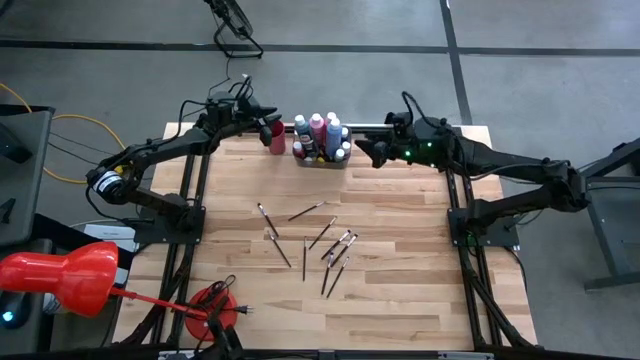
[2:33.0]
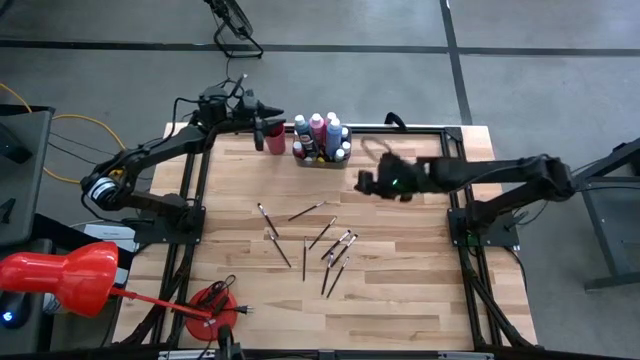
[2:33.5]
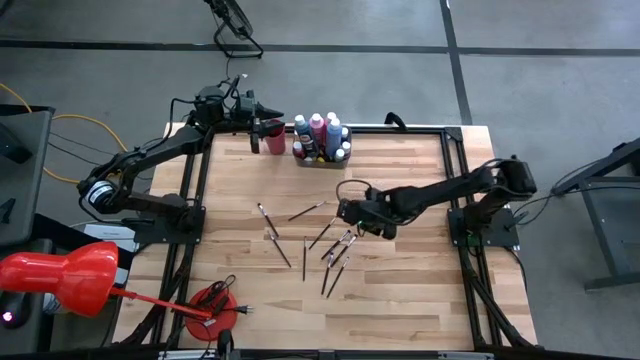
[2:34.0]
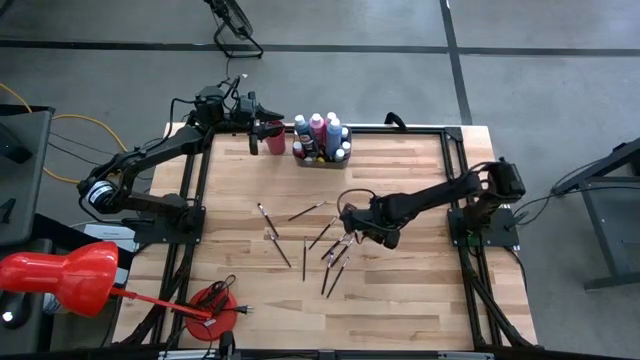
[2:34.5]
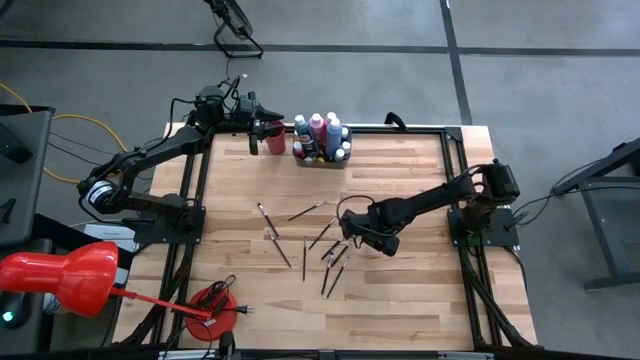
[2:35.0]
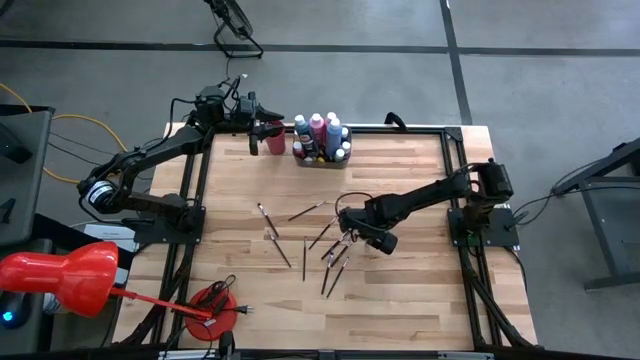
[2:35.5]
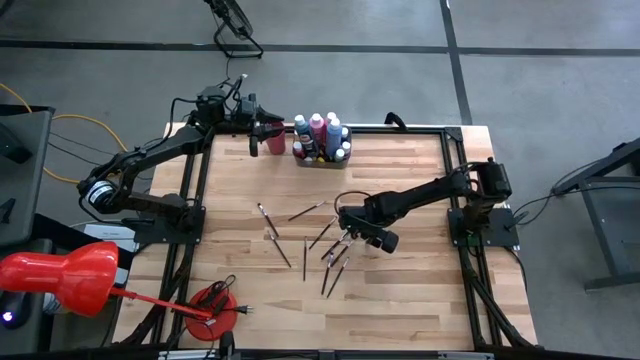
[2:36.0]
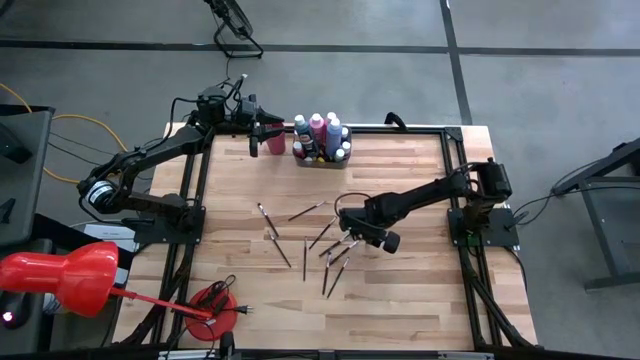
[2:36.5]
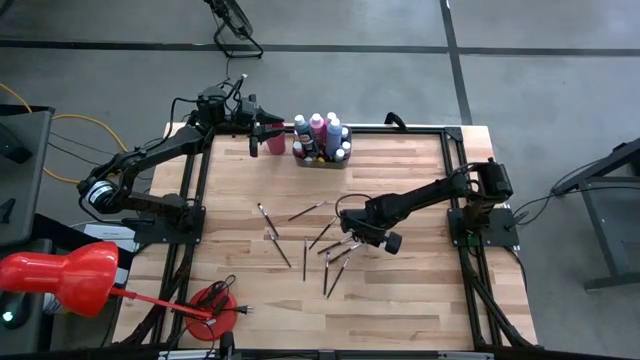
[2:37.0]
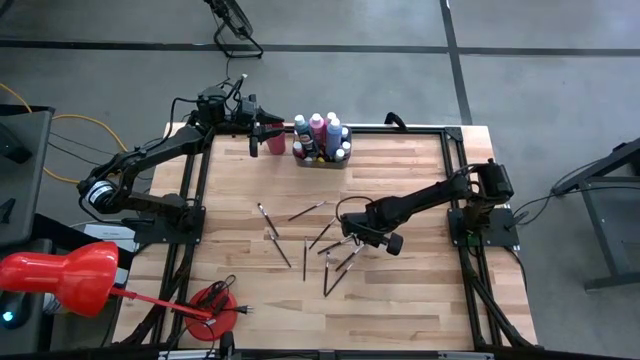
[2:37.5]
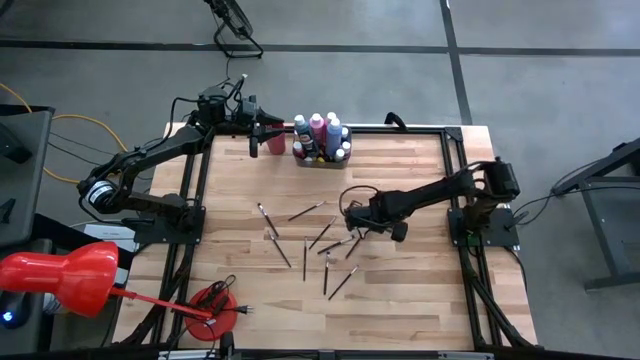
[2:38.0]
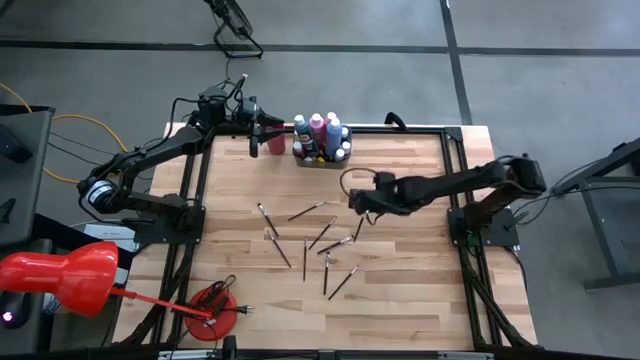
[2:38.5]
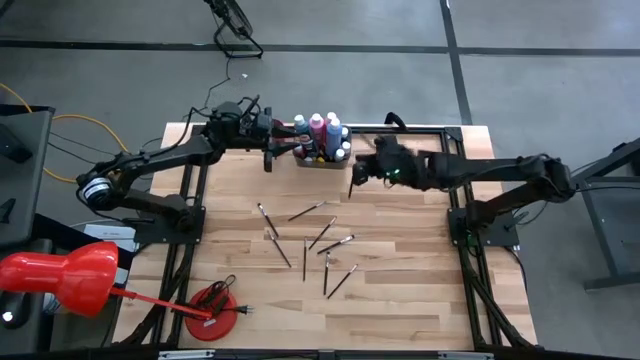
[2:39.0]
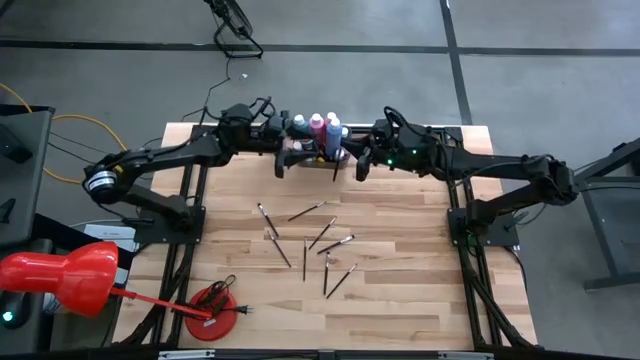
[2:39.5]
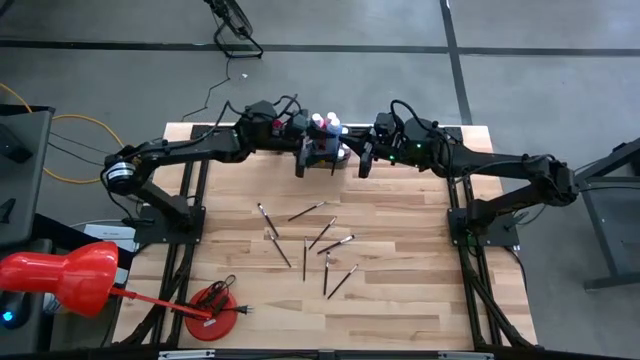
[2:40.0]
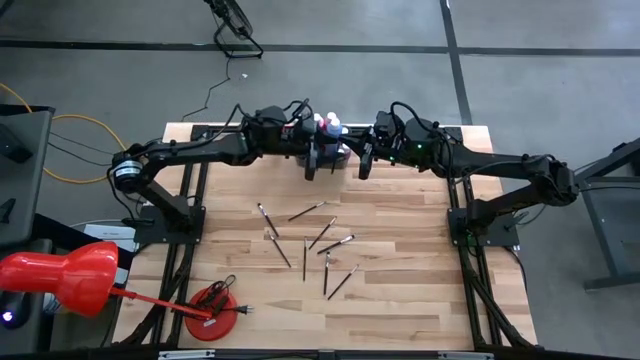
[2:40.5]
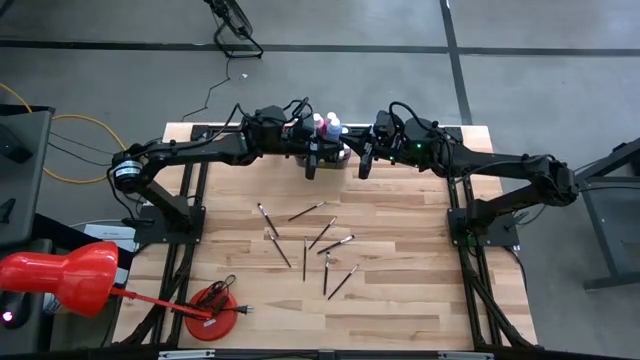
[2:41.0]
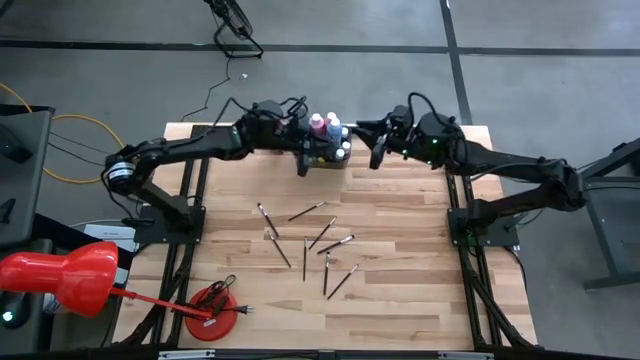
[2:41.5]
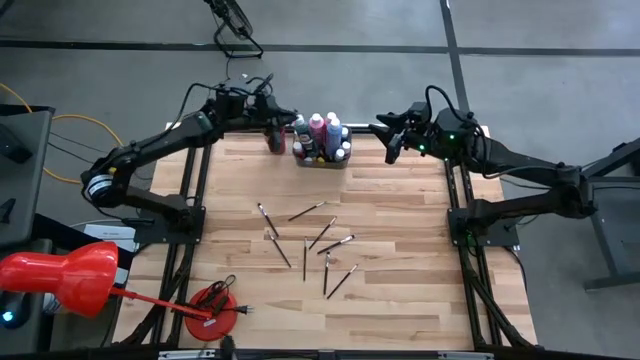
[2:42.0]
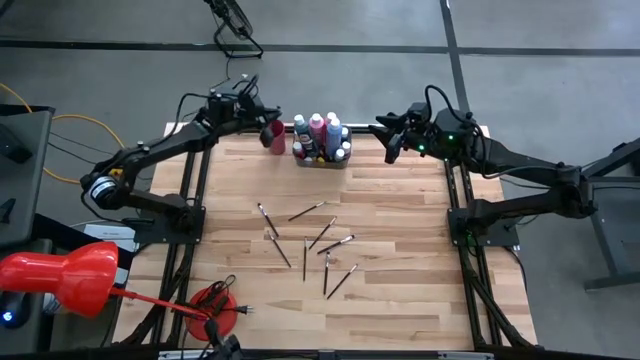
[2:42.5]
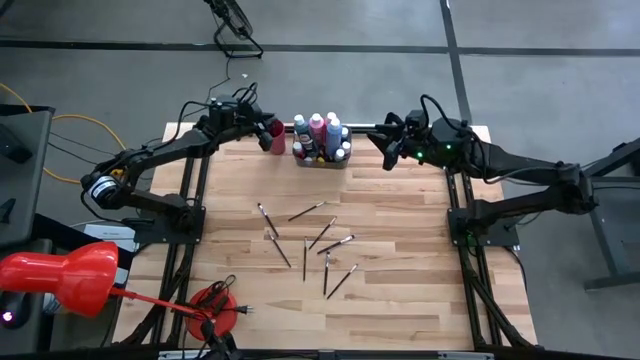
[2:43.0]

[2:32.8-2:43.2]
Task: Pick & Place Paint Supplies
Put the black paint brush into the pink cup

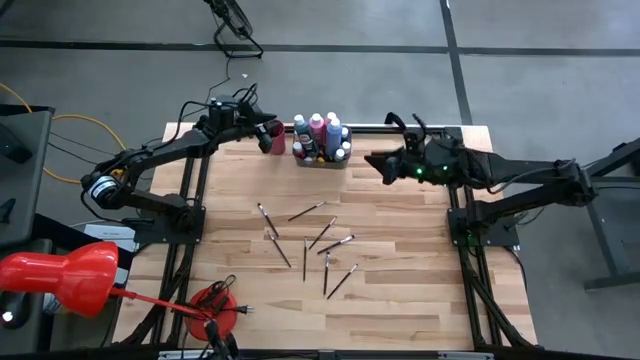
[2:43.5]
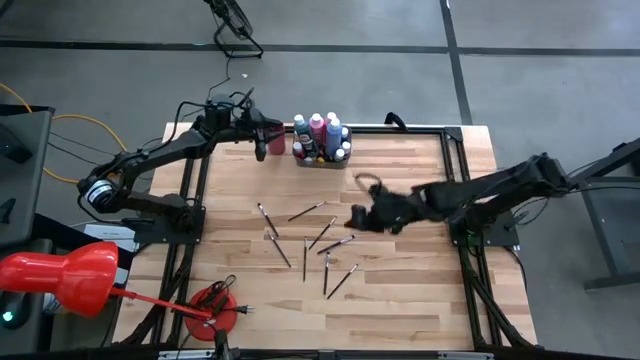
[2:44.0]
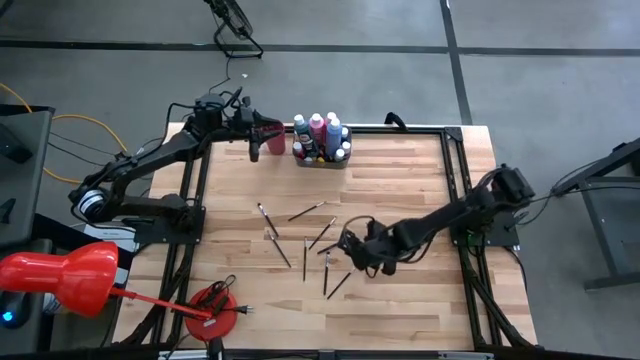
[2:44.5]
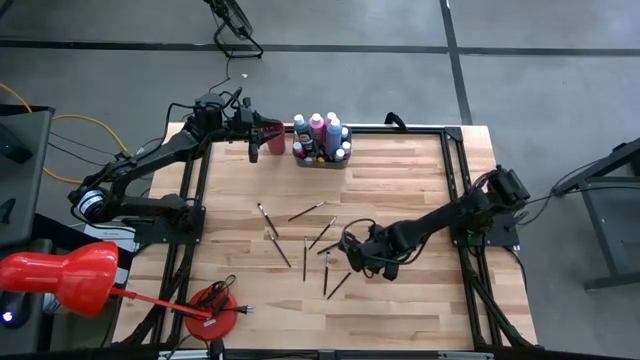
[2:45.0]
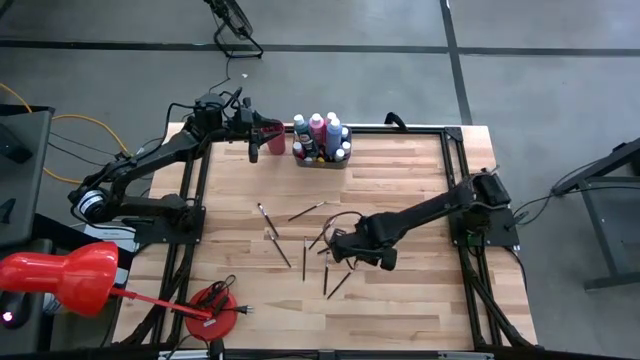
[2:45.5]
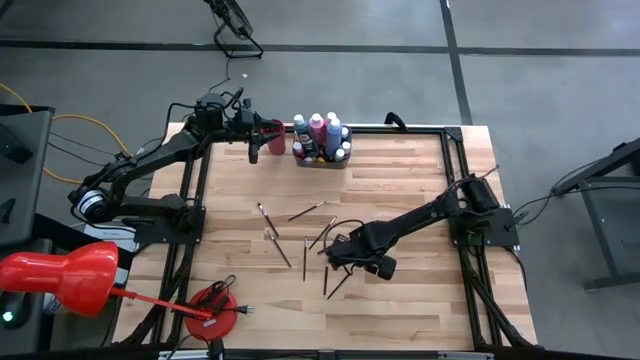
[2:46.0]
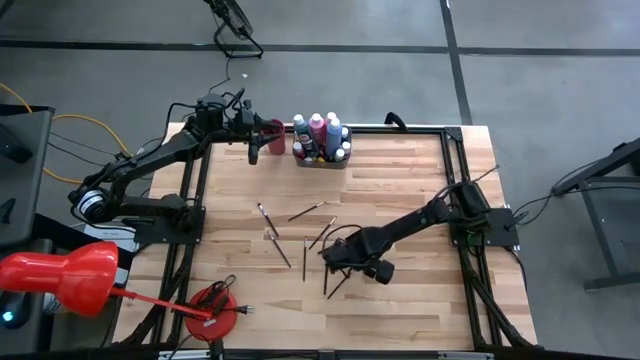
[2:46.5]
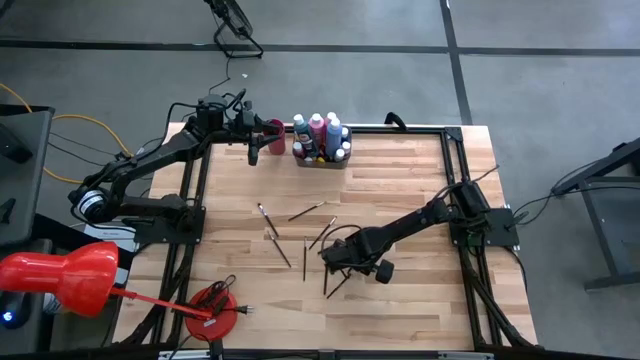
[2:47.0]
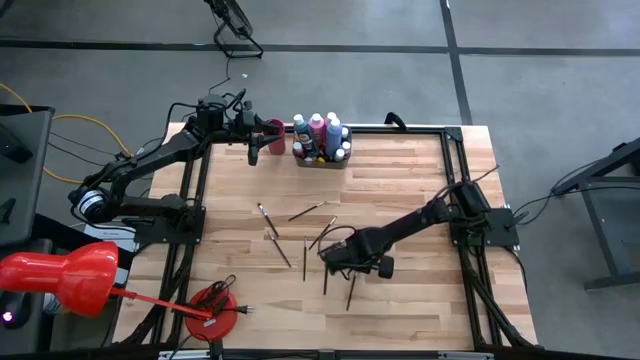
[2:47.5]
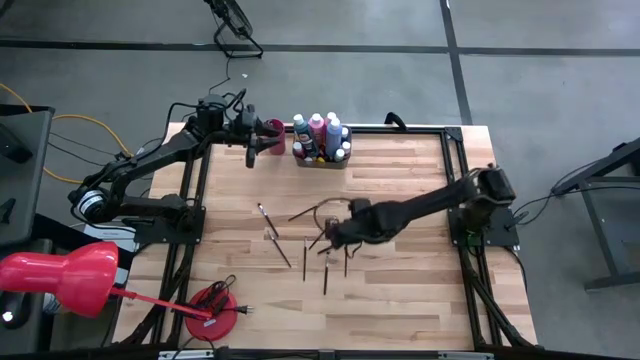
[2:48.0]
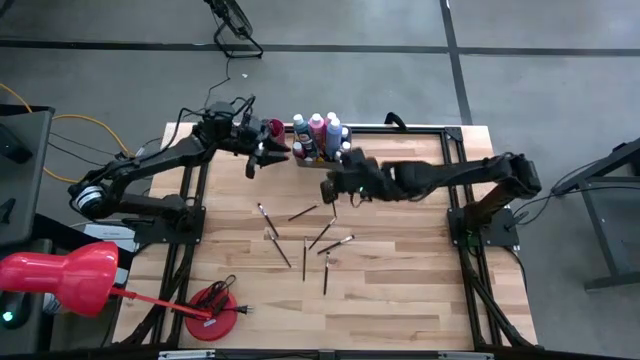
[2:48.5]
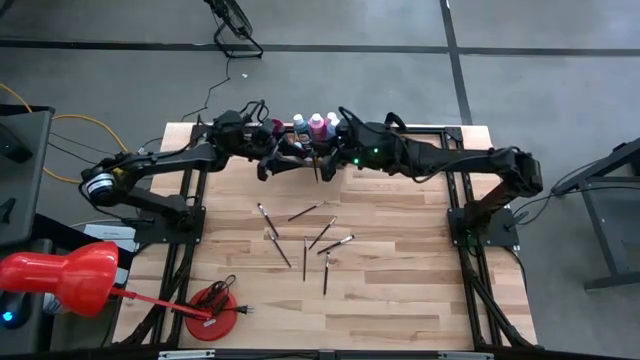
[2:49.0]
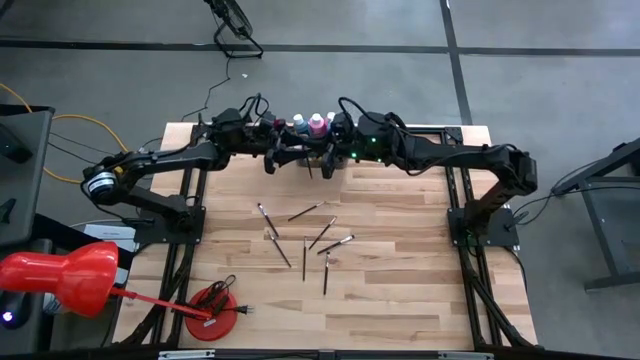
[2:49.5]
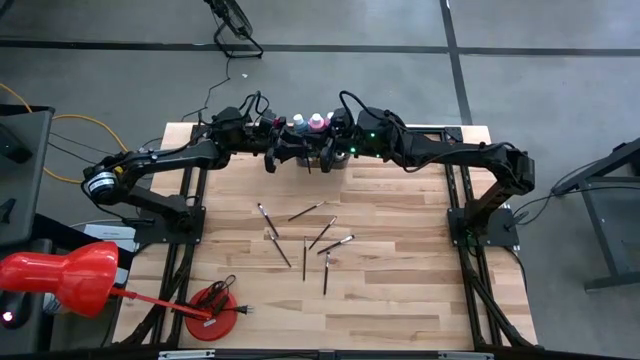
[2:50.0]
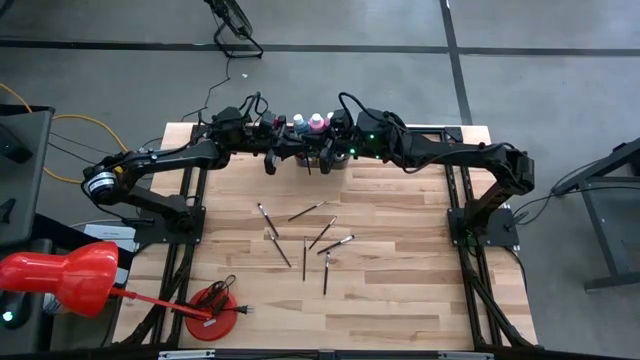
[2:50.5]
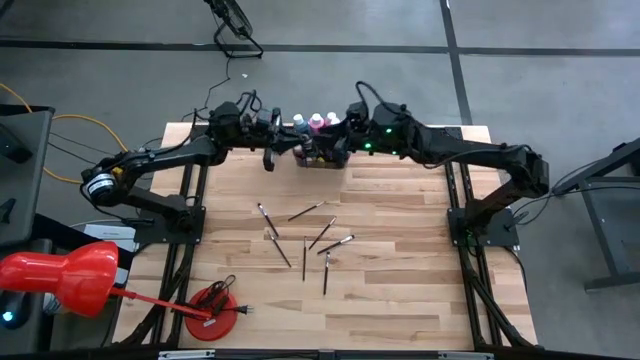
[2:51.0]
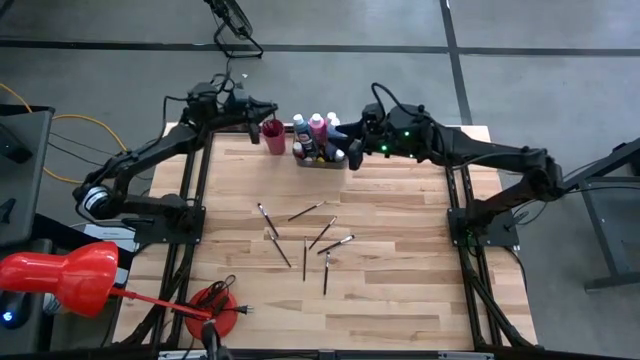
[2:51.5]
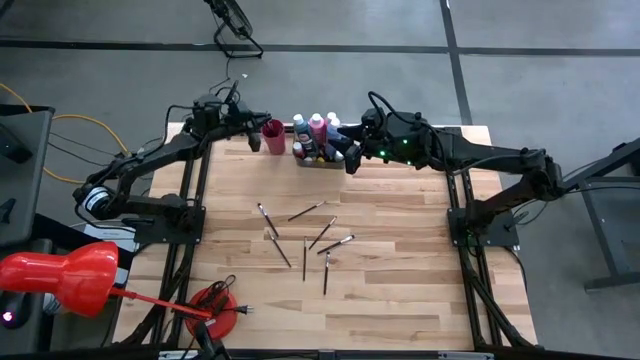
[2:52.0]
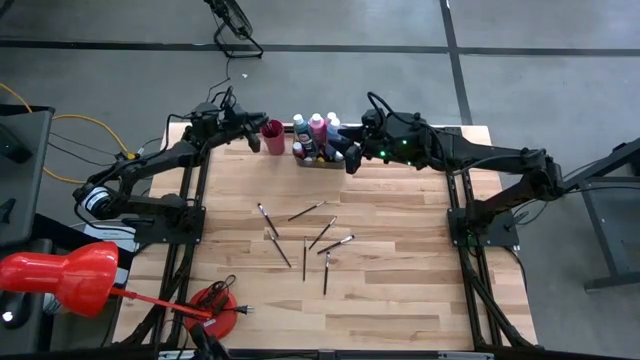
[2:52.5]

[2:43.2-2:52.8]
Put the black paint brush into the pink cup
